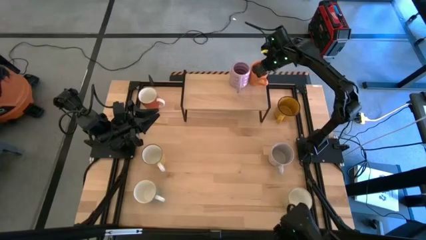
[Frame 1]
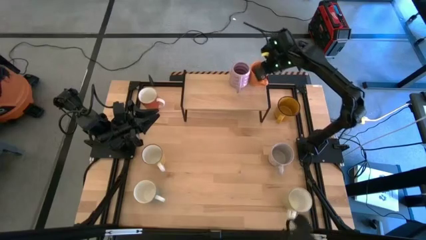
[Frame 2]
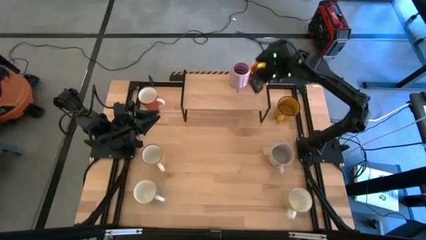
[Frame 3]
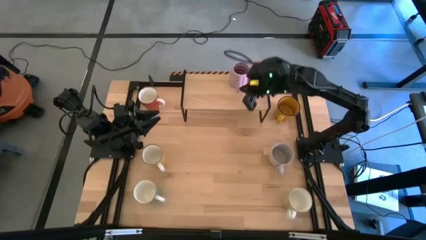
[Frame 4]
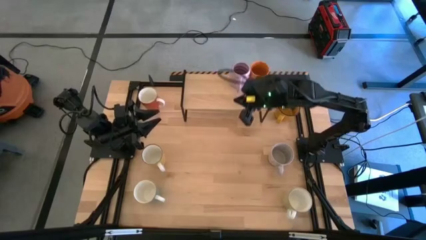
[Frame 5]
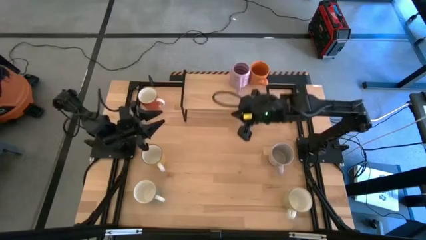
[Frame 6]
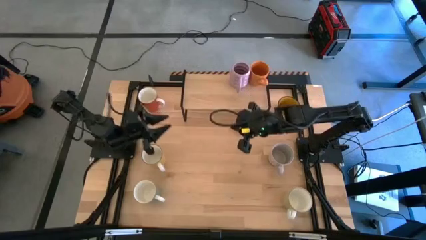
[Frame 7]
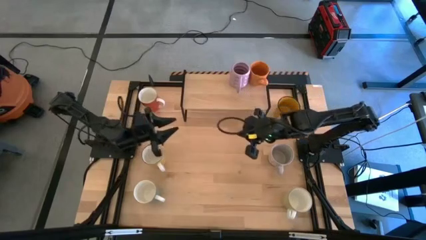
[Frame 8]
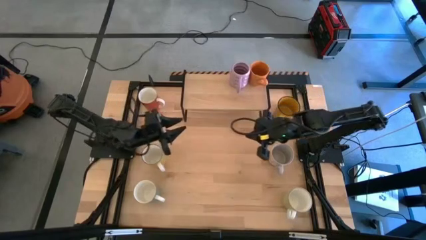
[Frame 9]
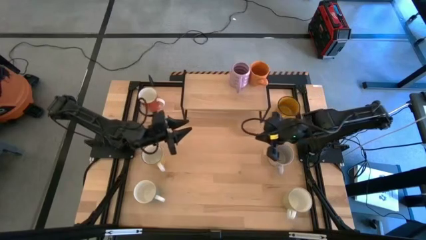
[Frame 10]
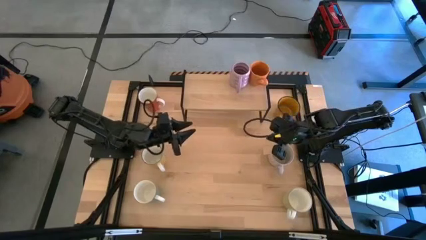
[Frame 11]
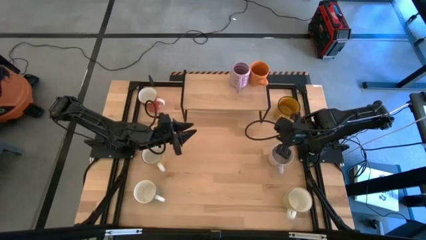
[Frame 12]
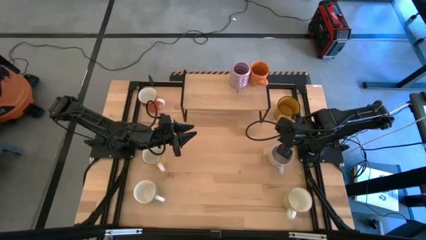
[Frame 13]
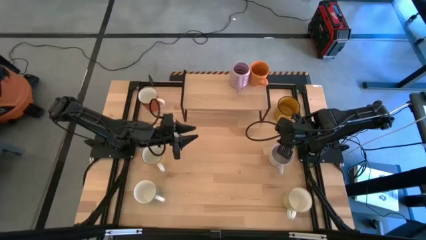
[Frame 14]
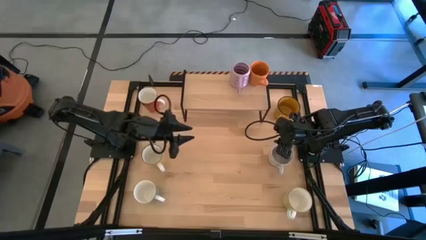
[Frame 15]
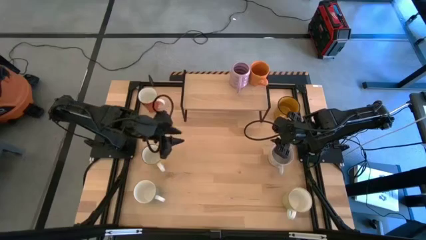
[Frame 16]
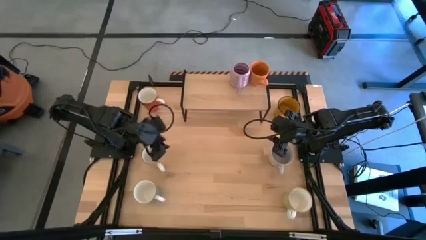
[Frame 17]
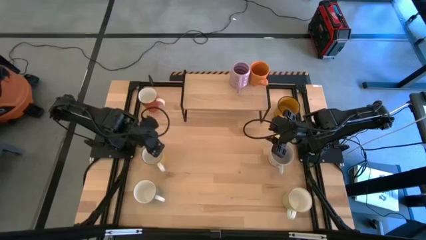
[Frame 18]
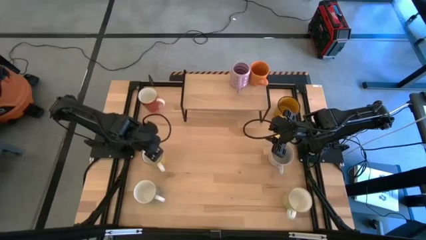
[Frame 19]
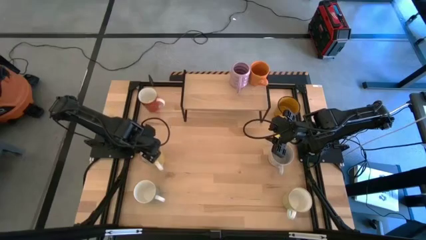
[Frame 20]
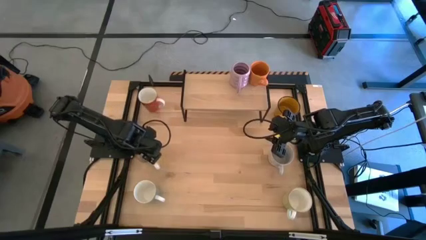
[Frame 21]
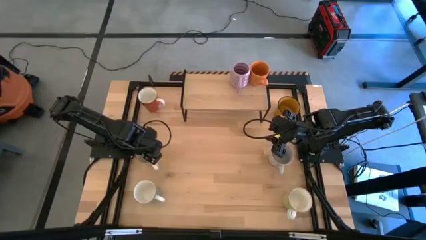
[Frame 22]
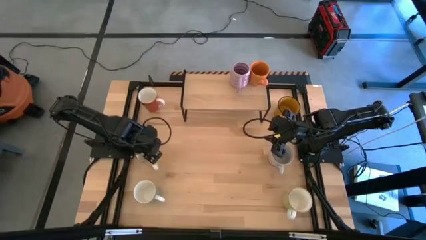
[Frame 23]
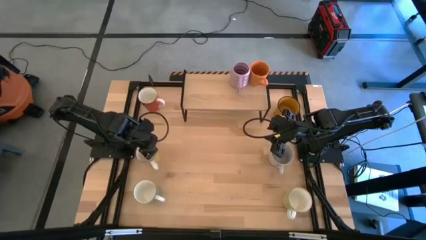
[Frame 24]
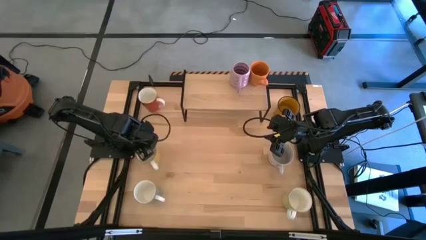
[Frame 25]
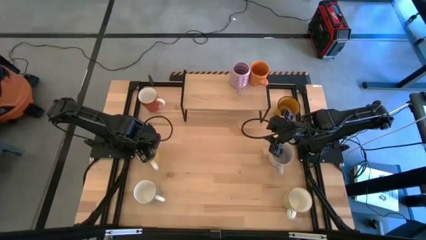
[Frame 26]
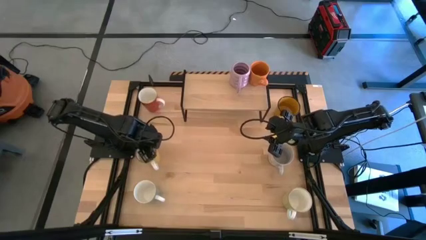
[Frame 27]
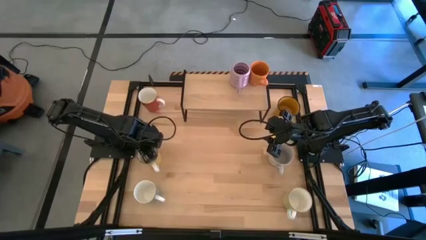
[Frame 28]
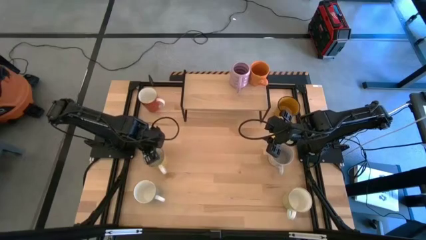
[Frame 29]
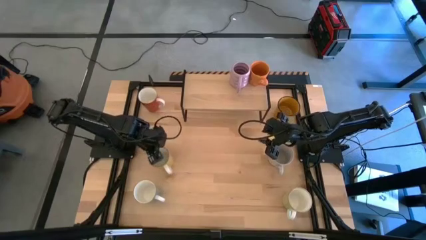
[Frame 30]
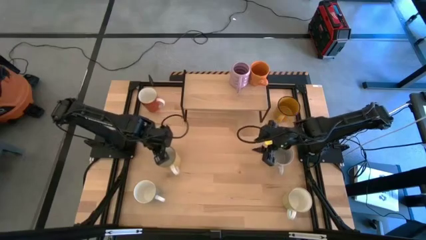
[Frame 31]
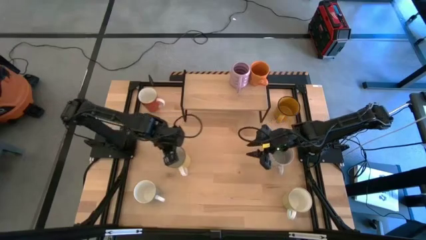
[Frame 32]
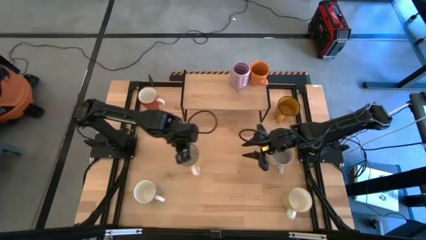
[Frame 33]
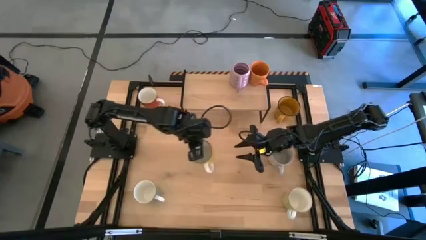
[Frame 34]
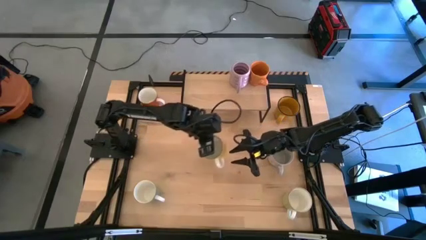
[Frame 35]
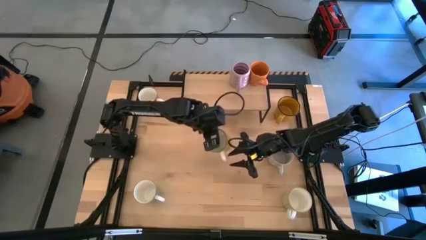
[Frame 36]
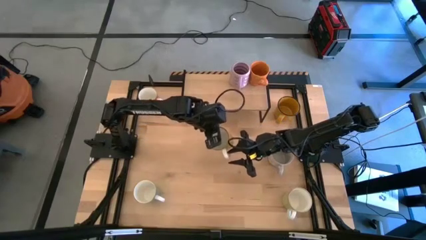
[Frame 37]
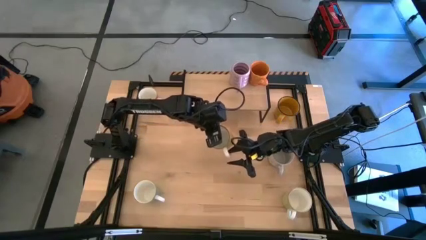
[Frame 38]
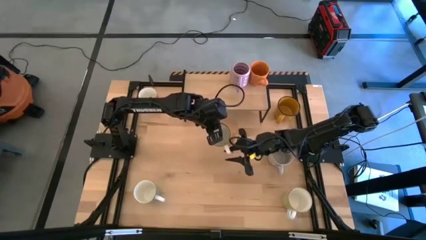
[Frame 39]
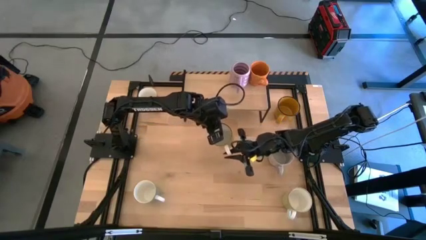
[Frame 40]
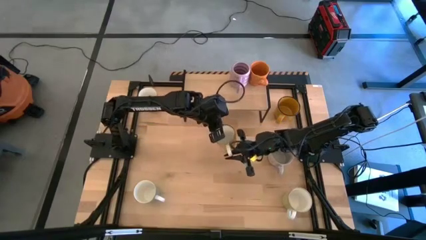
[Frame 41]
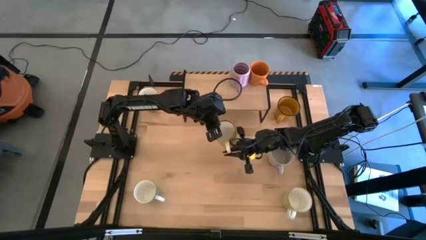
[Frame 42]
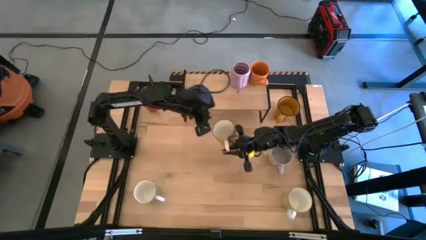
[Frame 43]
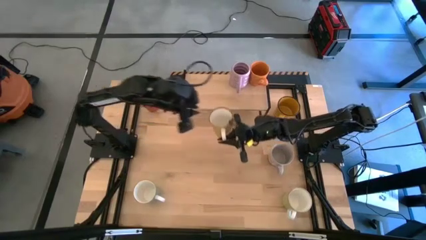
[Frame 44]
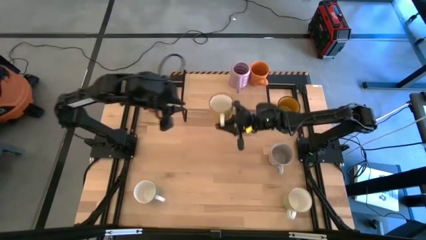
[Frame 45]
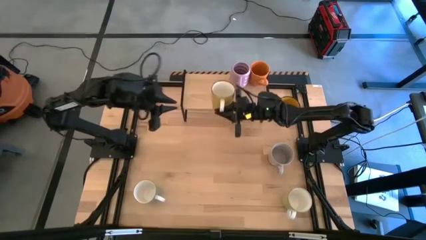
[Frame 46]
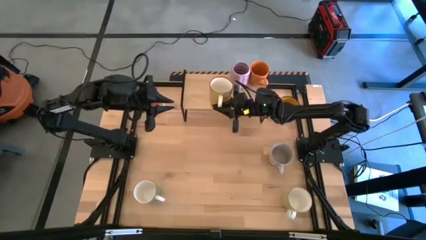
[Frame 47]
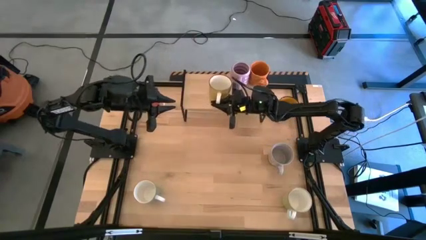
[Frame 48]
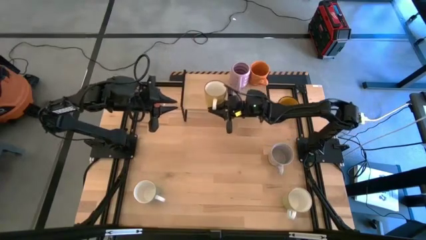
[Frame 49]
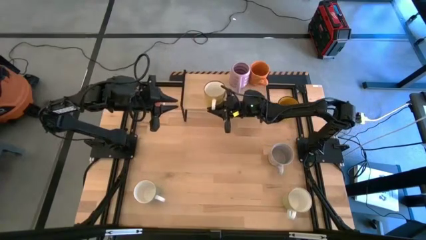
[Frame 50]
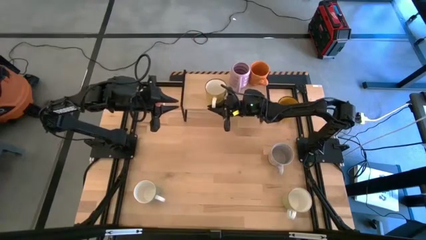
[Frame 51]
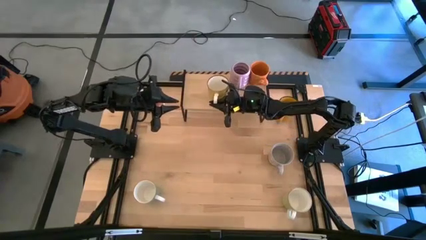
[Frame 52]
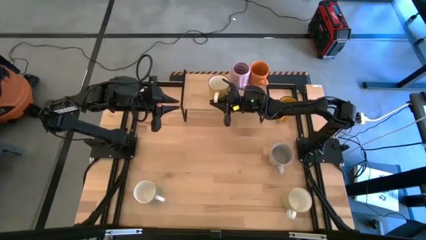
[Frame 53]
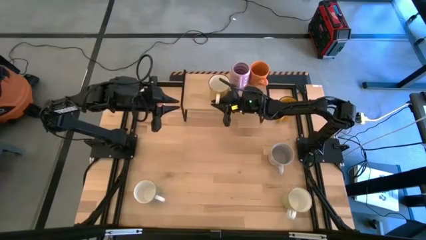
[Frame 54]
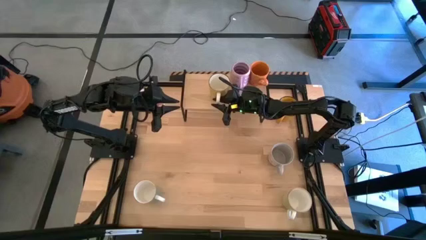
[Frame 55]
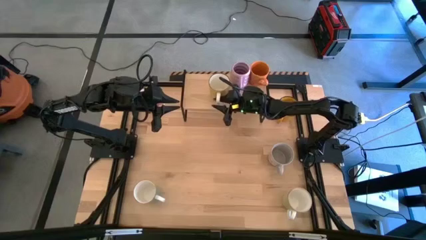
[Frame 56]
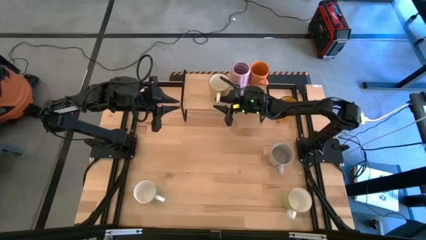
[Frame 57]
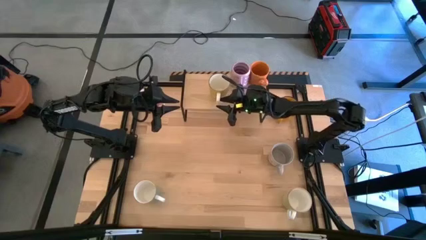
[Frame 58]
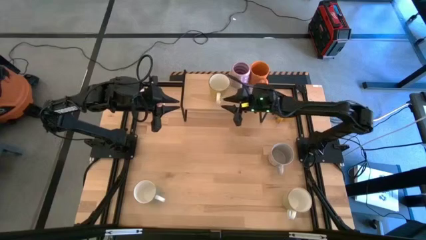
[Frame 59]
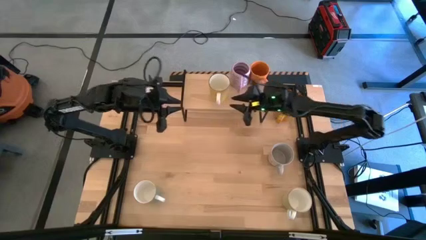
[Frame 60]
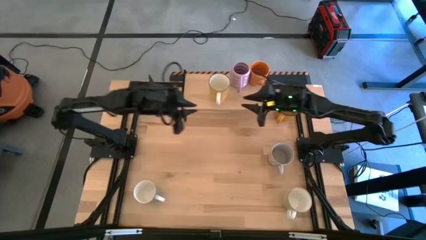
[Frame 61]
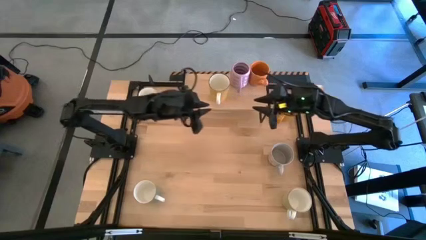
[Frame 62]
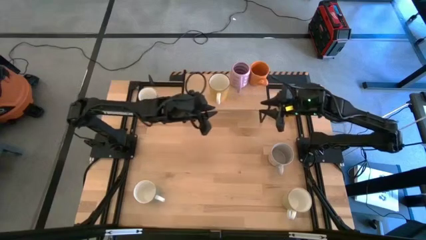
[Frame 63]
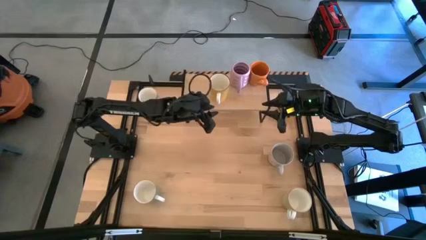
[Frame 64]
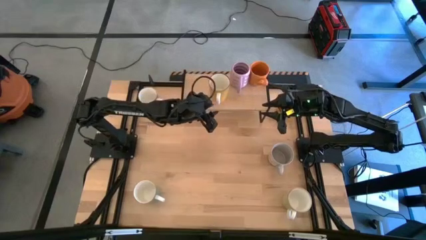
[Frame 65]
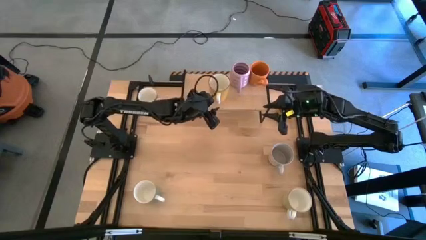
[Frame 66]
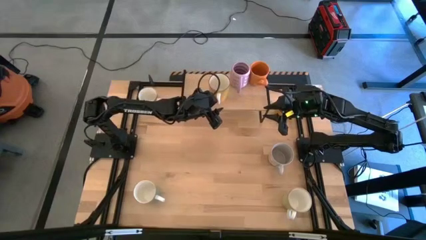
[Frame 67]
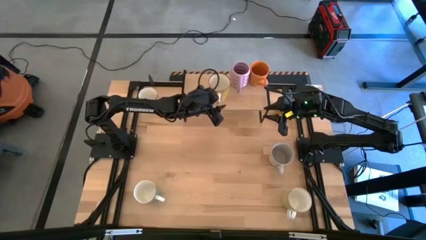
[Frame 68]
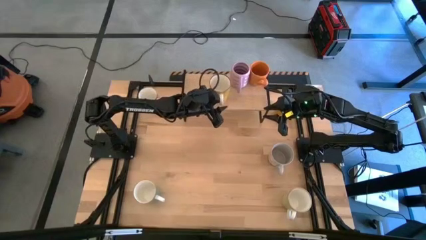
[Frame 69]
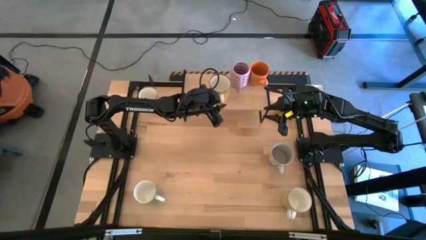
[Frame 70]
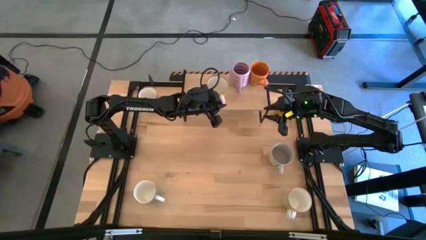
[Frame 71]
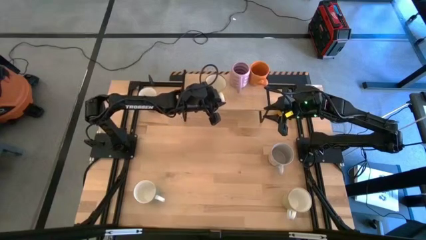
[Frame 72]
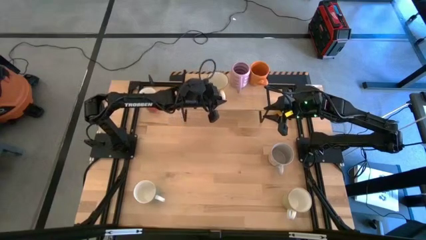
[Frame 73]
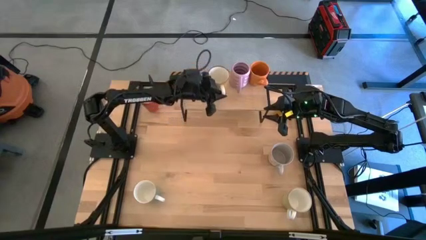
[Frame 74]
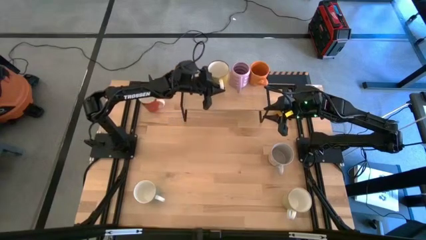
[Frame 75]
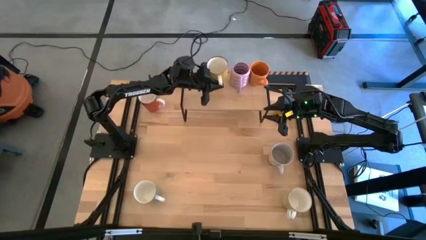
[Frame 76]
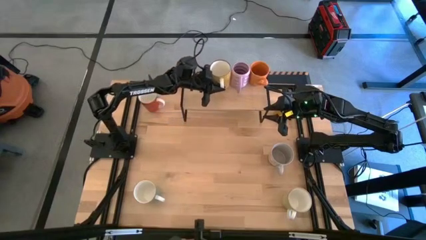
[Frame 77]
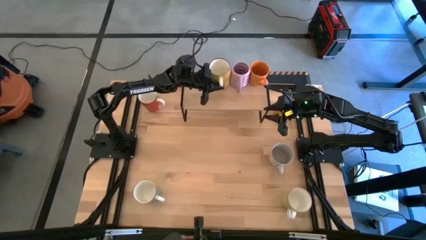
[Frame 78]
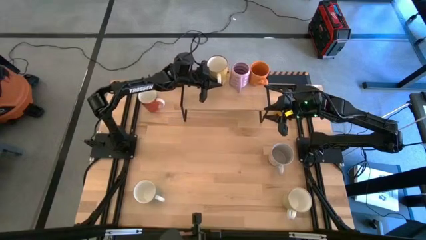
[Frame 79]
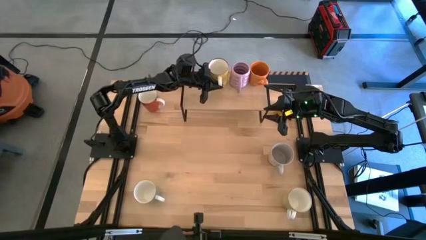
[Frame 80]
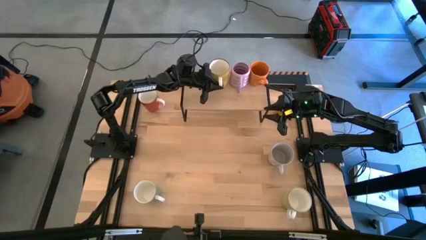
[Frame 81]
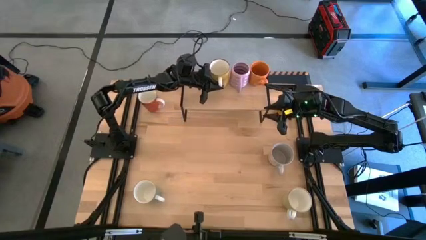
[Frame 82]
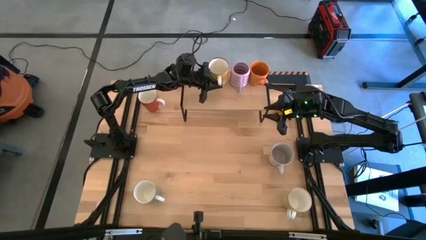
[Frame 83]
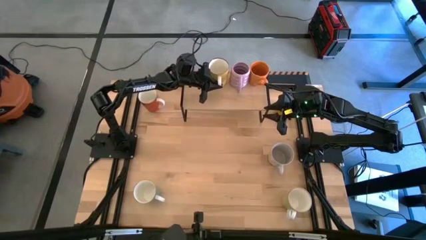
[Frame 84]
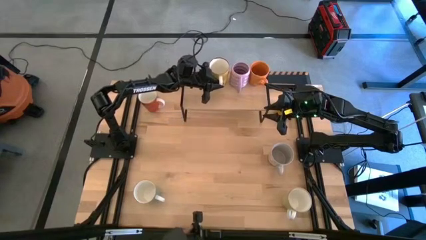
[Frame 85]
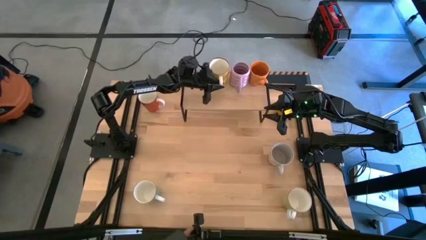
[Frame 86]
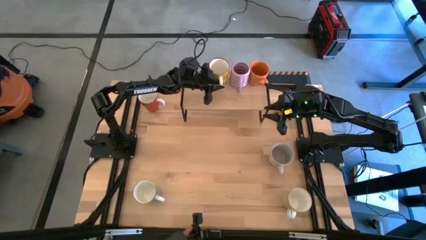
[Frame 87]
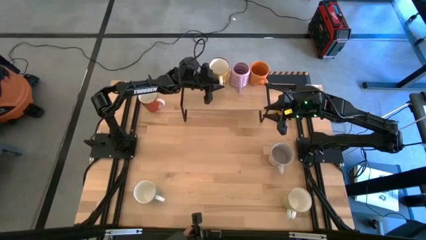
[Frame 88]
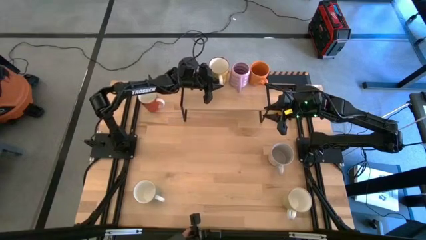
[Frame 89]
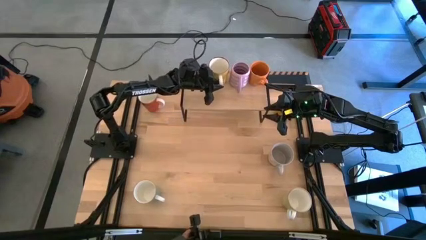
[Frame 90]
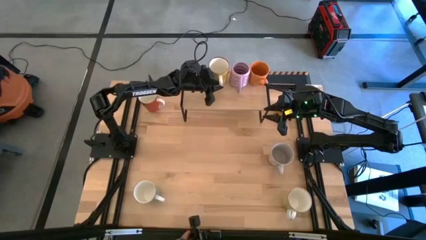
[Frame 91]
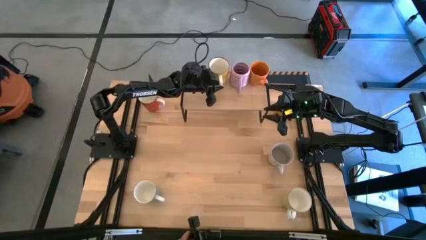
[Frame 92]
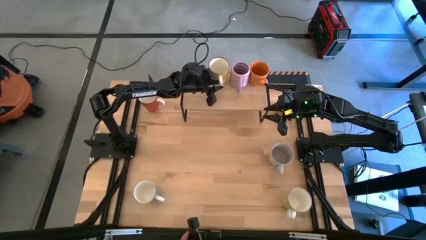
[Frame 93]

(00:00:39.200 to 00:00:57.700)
Task: Place coffee mugs
Put the brown mug on the shelf
